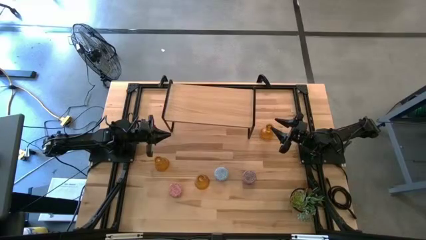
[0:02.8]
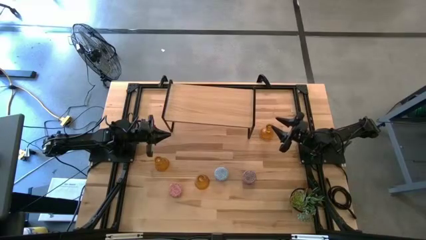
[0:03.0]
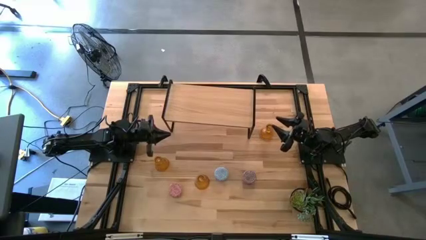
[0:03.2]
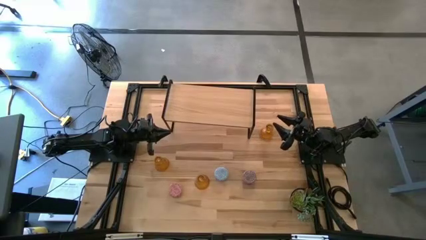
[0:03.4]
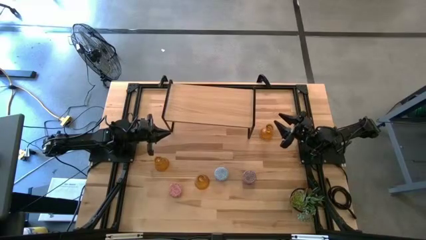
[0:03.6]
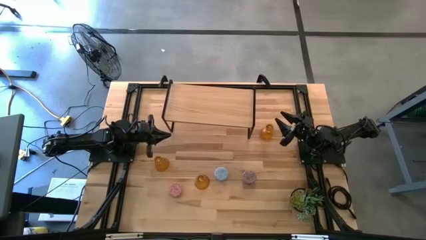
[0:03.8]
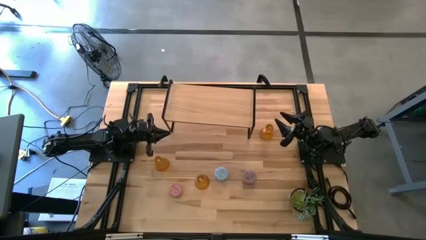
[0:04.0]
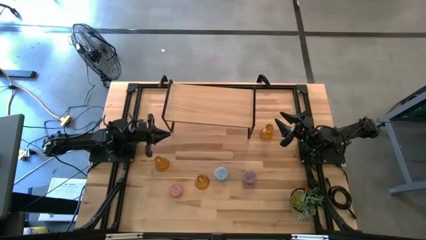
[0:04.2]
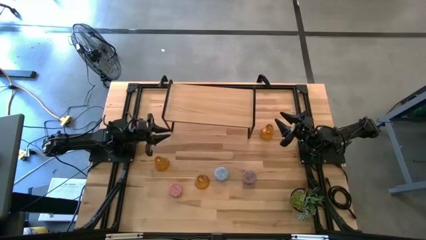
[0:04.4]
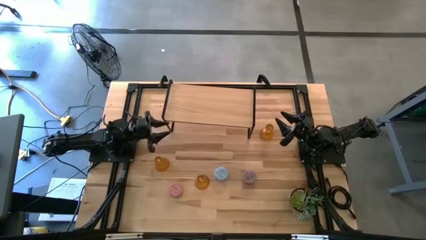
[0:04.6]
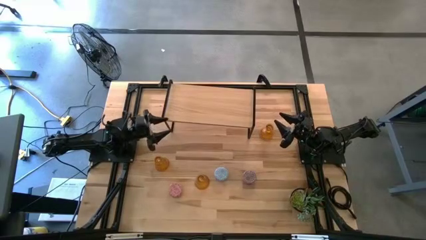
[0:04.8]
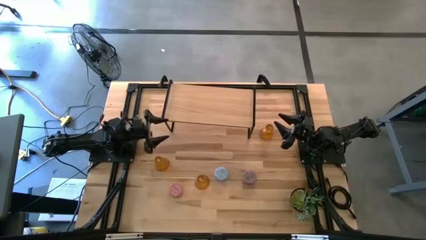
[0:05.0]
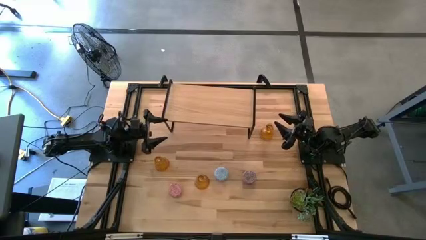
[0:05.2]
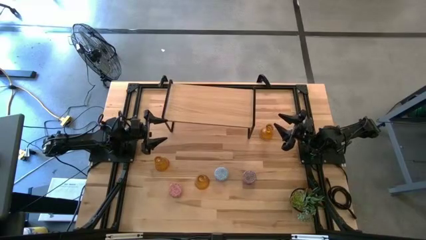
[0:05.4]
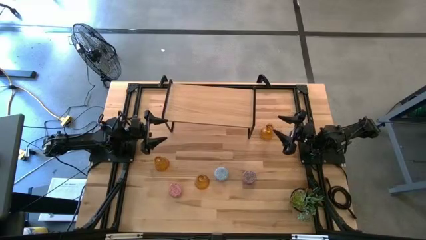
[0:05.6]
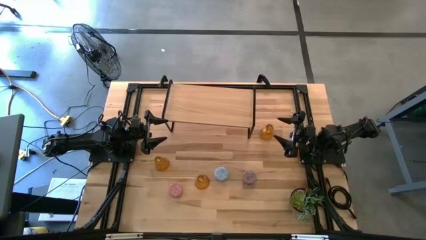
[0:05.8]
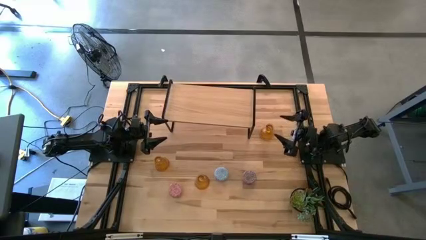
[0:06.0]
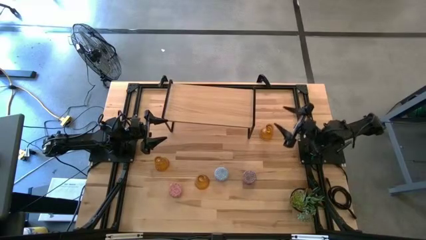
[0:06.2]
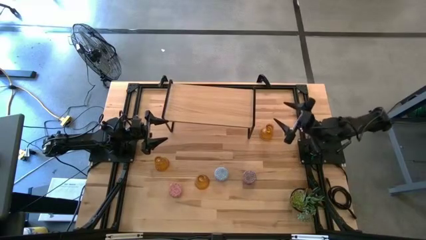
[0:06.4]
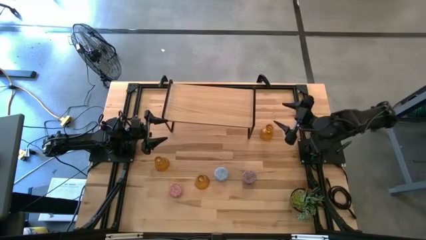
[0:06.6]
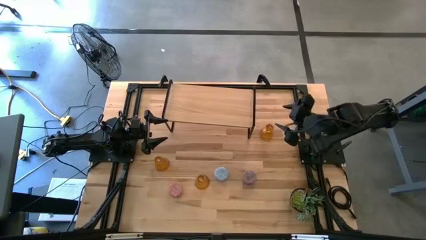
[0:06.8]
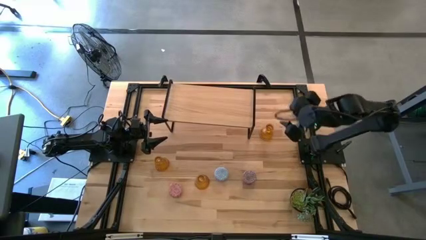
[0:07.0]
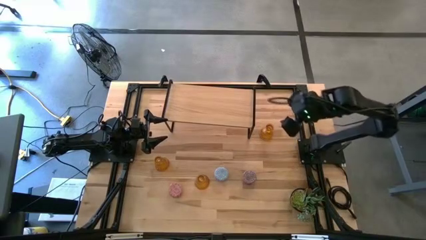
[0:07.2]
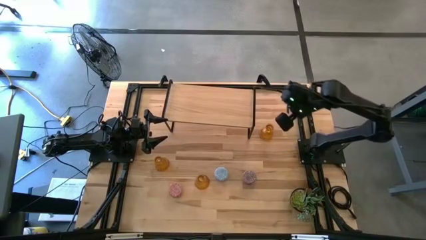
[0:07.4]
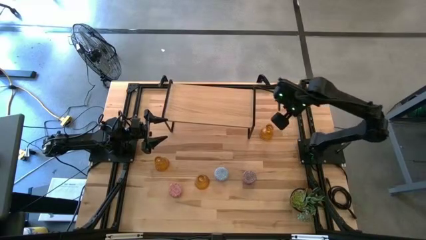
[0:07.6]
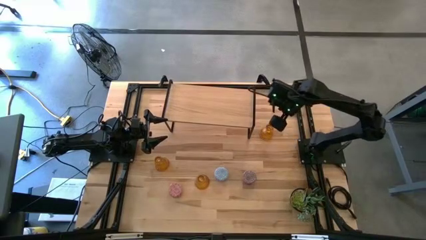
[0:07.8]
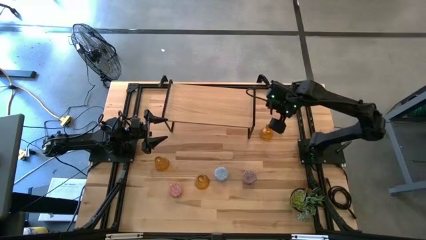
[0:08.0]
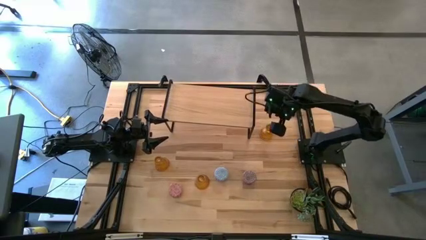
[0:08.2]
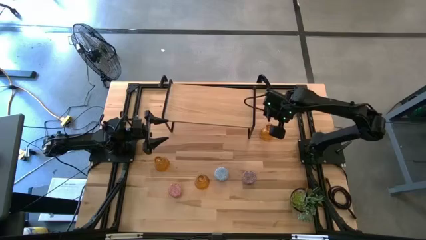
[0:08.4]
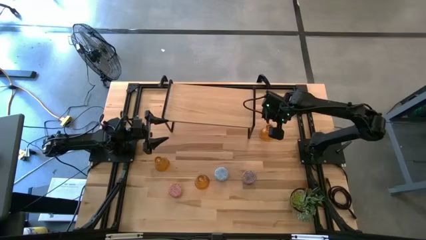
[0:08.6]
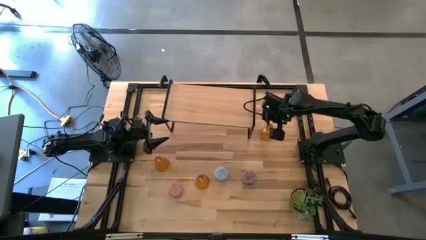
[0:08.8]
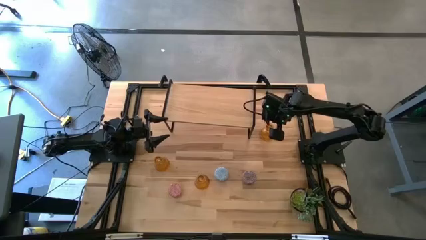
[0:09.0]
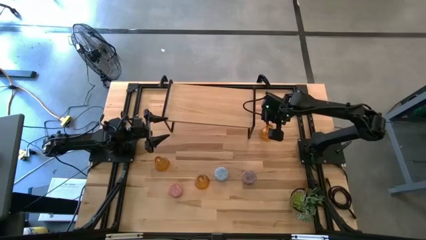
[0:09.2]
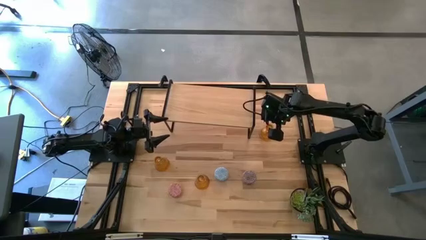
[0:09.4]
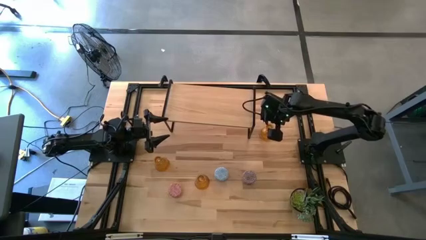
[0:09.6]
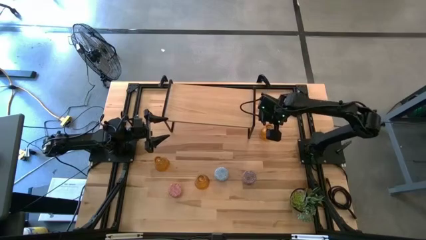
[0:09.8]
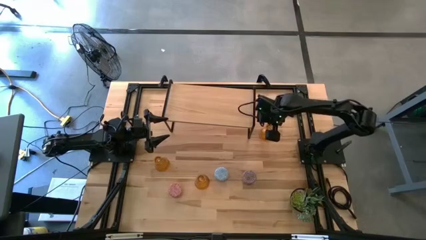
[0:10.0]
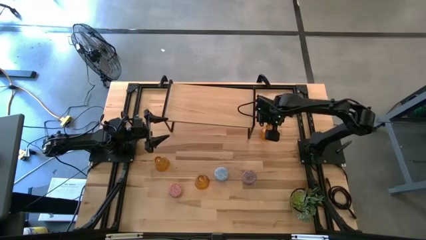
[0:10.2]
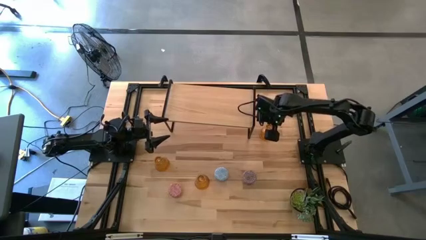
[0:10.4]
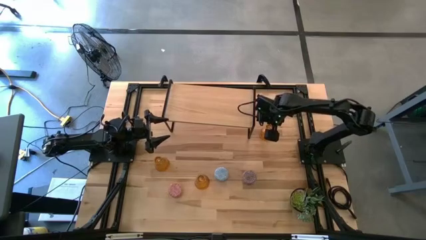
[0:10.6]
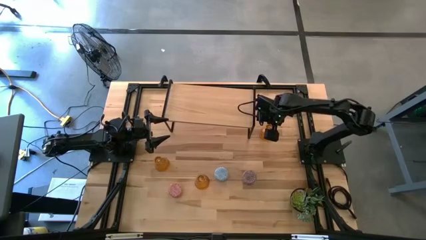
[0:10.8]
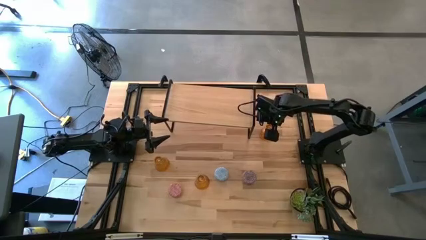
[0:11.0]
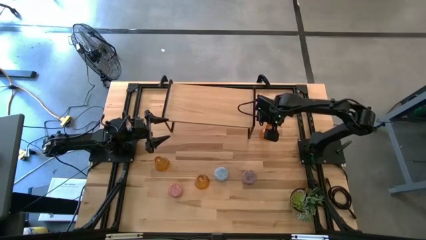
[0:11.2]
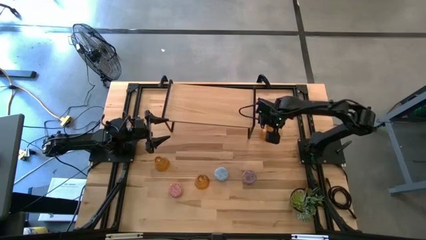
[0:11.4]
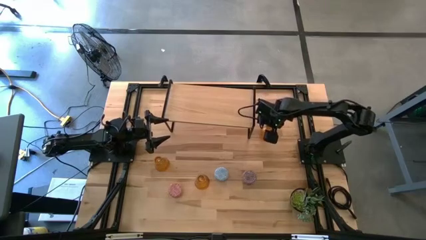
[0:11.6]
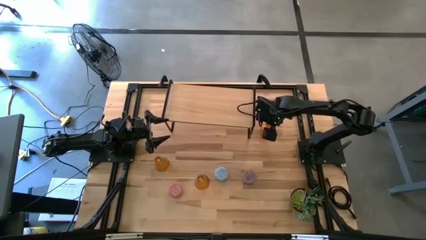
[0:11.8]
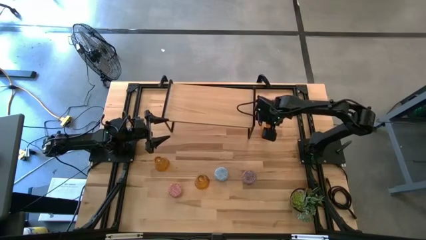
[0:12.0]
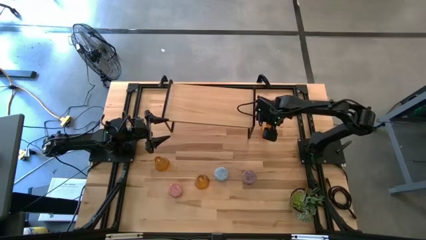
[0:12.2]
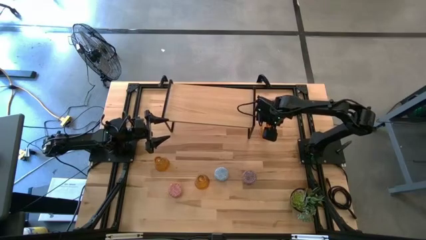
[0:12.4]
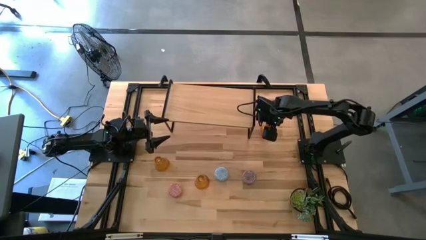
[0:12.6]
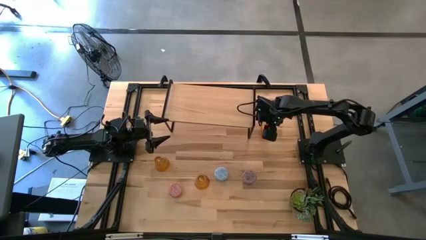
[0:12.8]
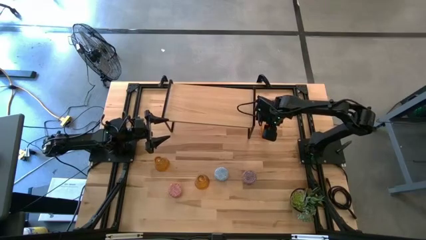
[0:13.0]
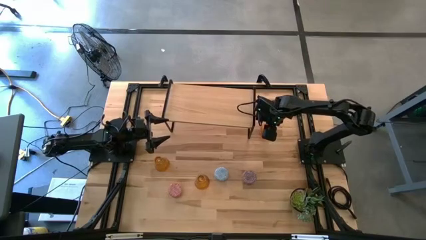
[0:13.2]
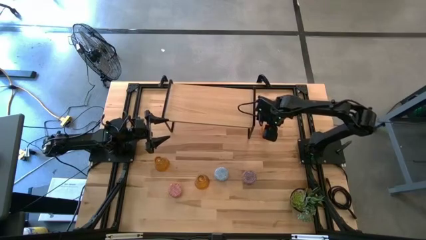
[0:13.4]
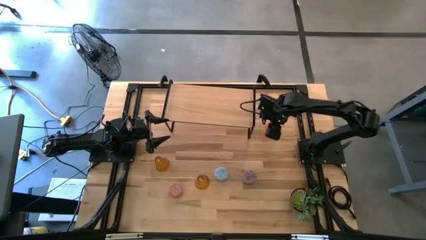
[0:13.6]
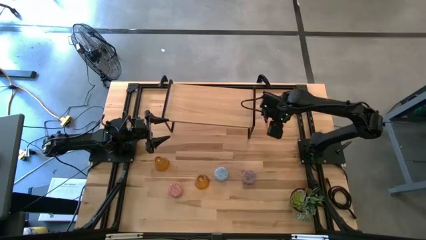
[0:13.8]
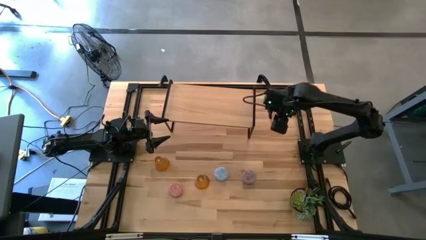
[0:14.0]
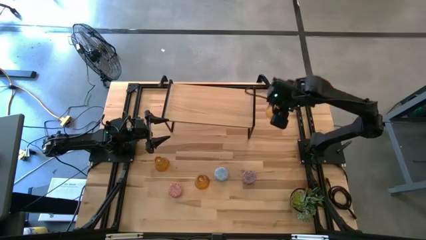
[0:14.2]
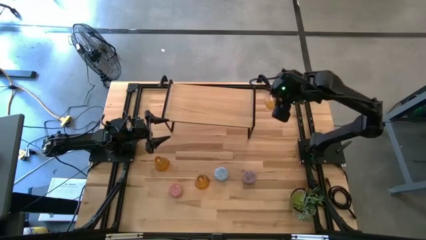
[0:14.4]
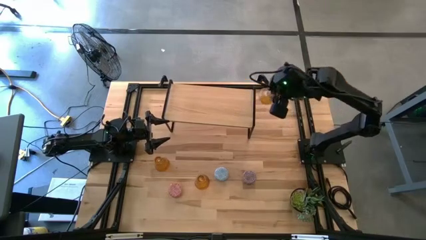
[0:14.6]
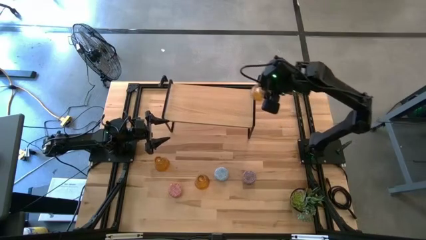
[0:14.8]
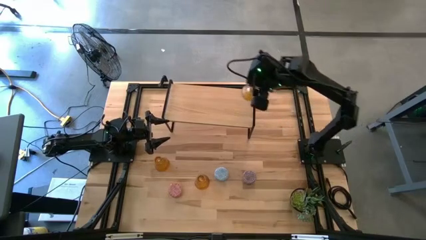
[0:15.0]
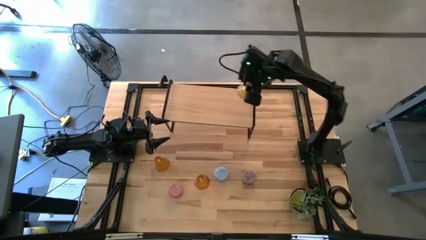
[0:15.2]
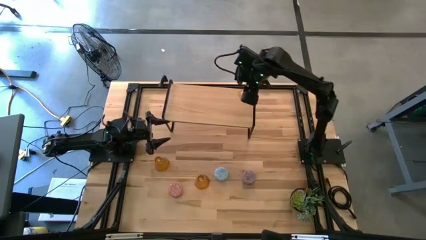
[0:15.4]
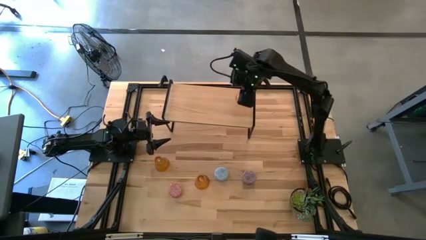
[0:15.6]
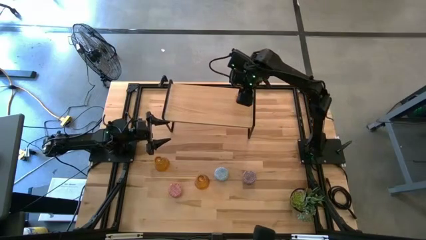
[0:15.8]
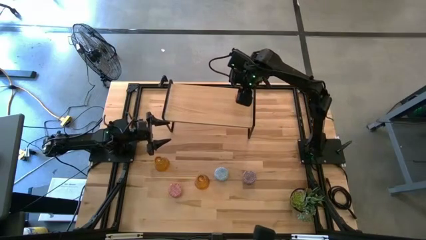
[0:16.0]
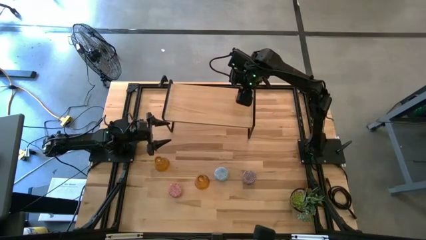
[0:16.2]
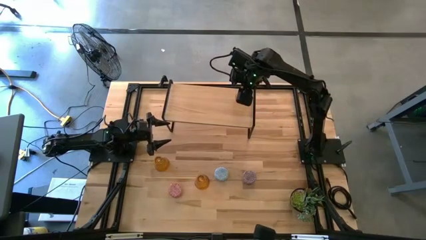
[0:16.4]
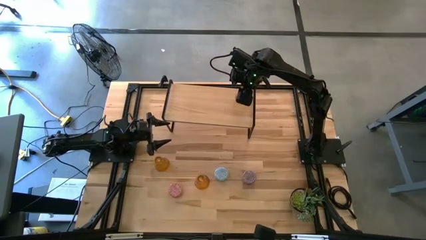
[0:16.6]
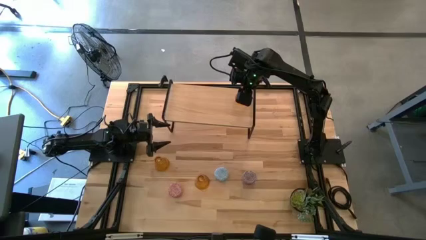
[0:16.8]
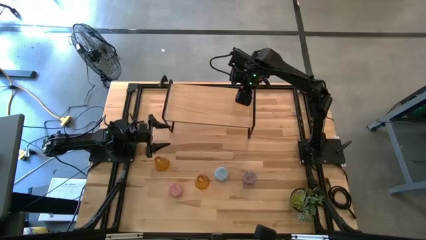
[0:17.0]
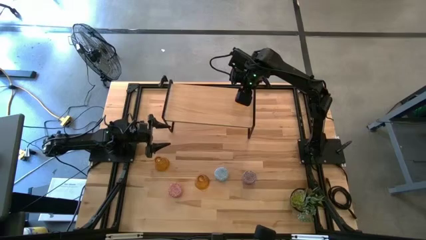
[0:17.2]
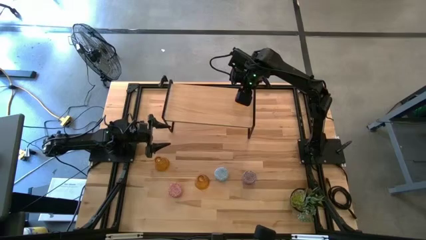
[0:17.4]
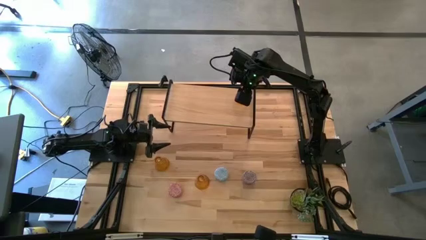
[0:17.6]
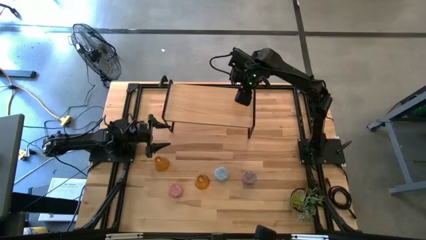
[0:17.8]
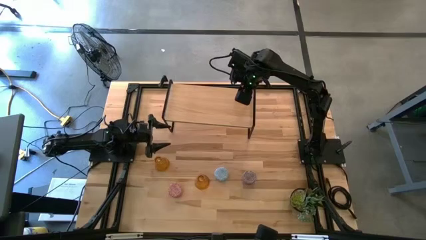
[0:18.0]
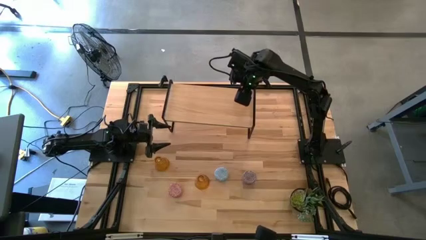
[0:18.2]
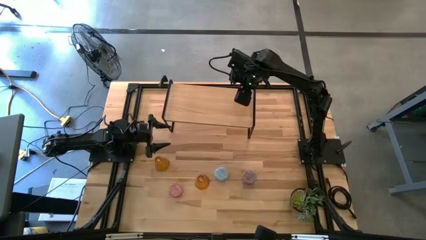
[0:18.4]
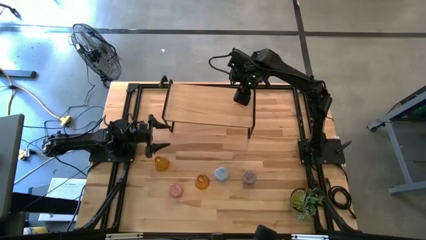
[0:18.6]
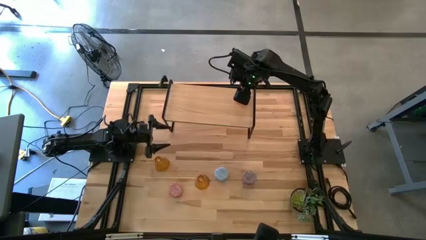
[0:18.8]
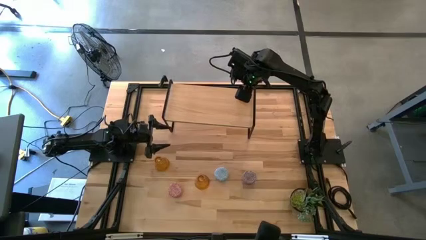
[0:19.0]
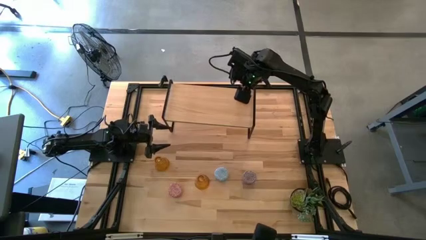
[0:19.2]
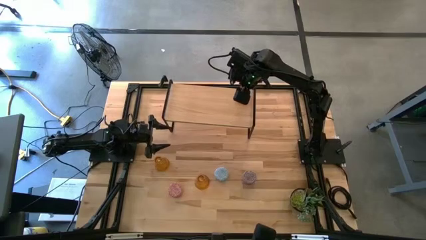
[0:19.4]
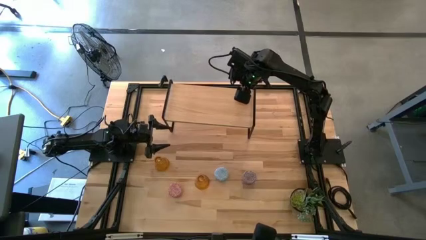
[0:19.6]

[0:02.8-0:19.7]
Task: Pick & Place candle stick holders
Put the top right yellow candle holder on the shelf
